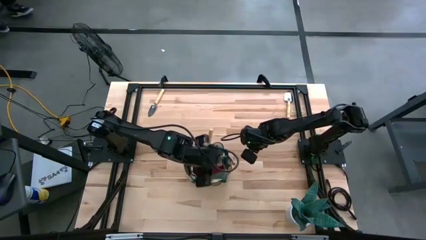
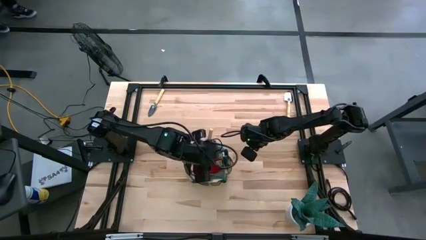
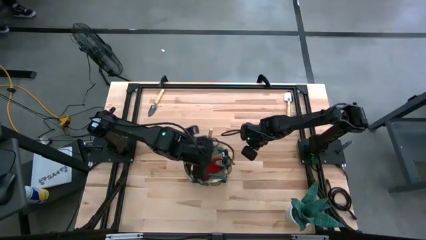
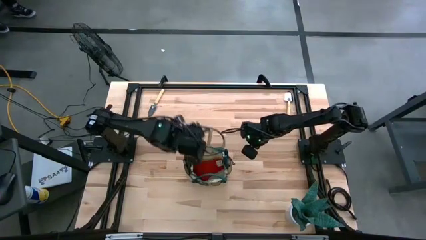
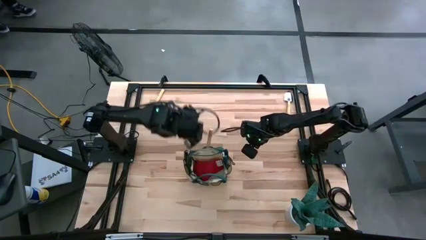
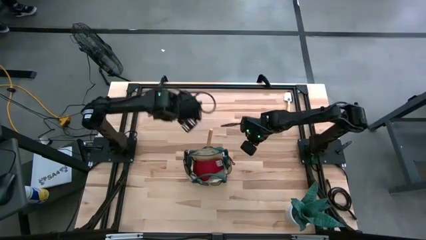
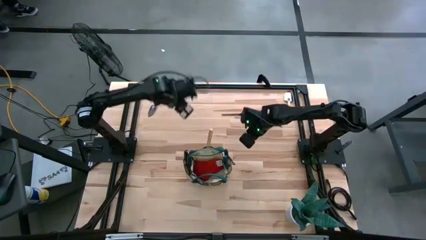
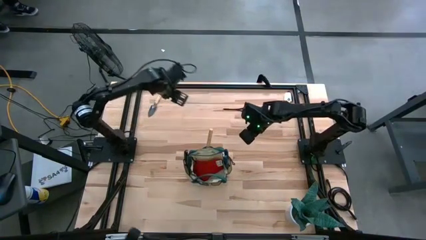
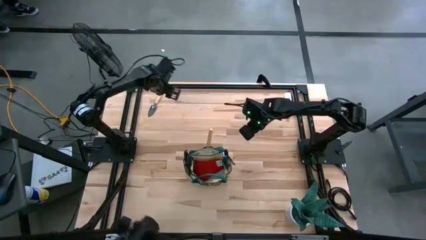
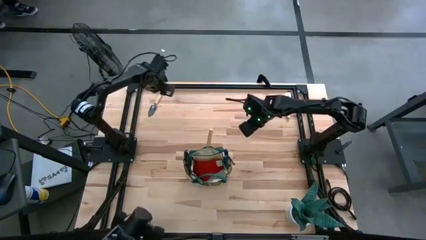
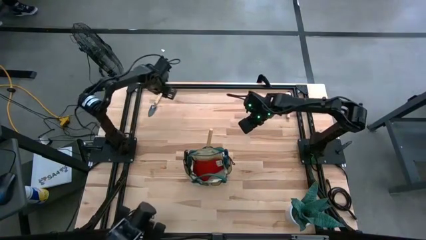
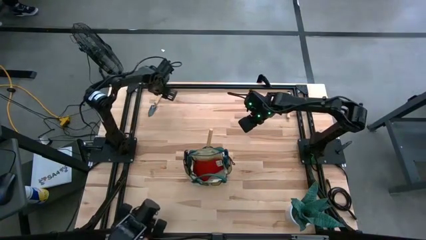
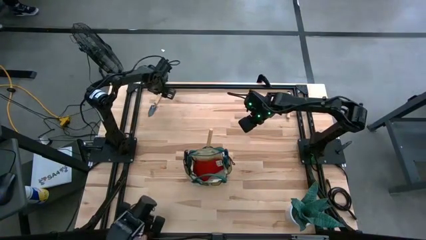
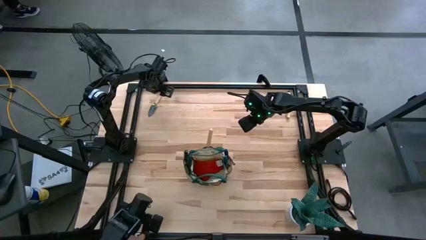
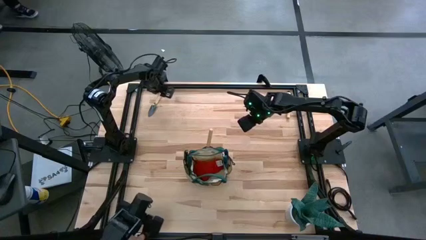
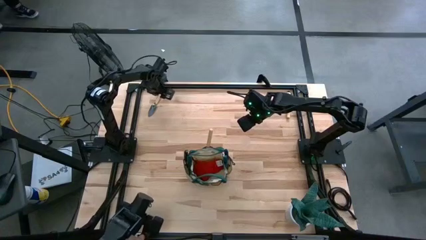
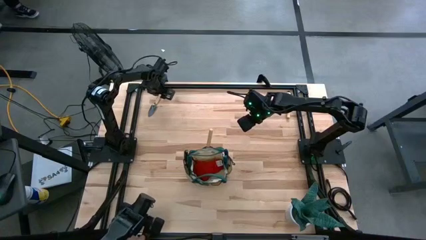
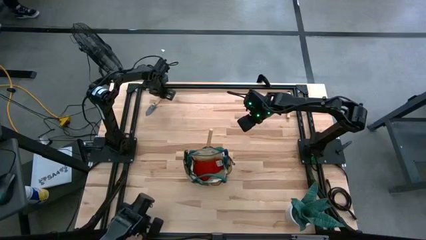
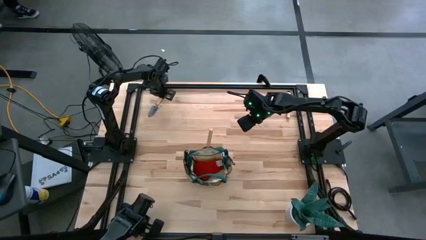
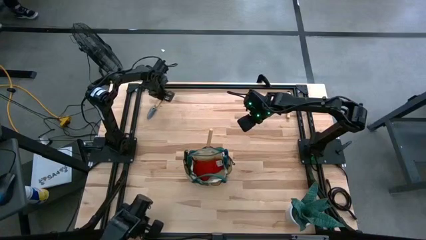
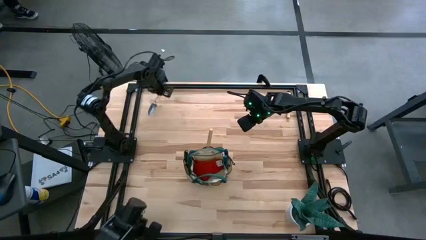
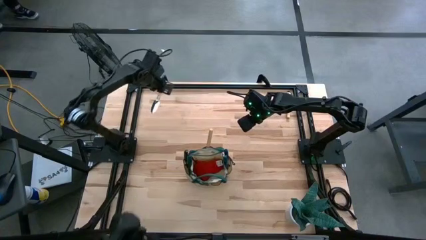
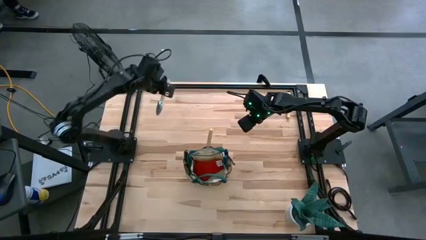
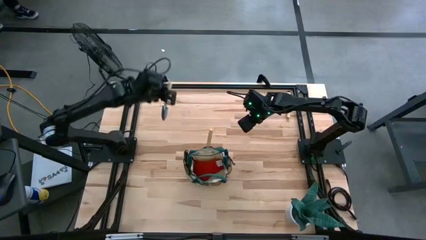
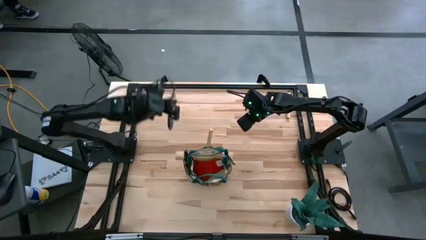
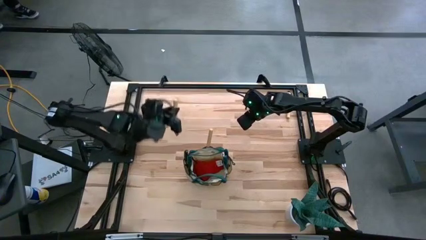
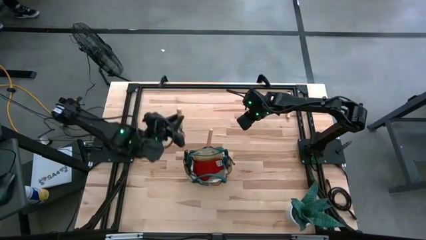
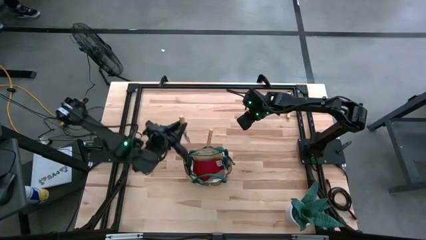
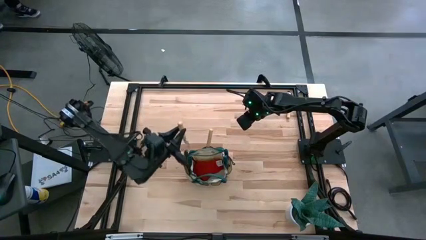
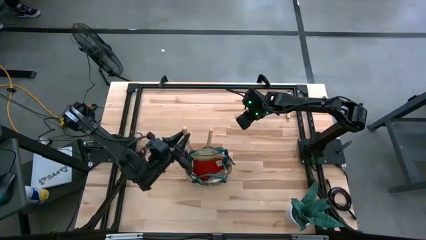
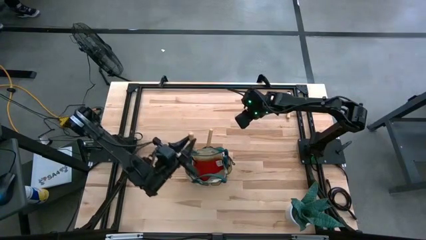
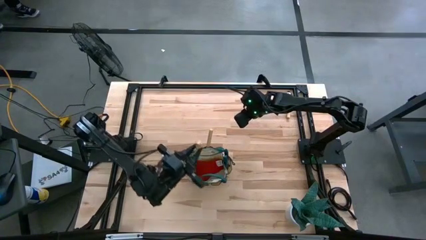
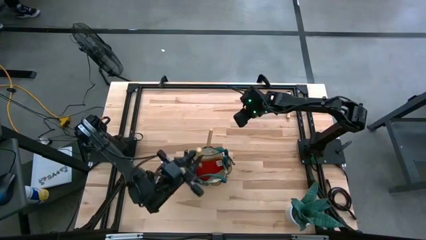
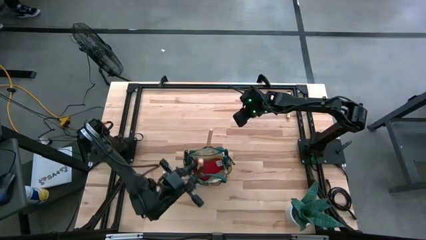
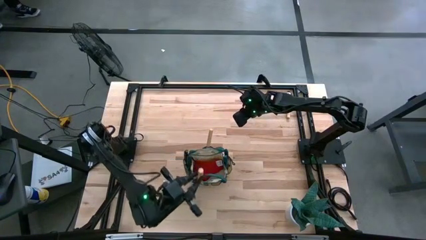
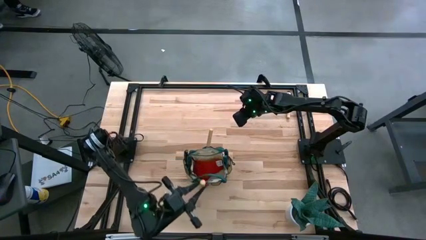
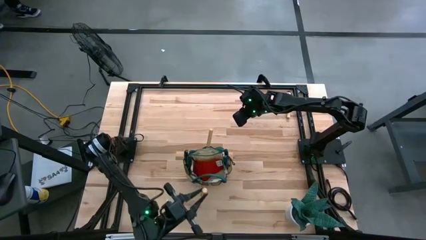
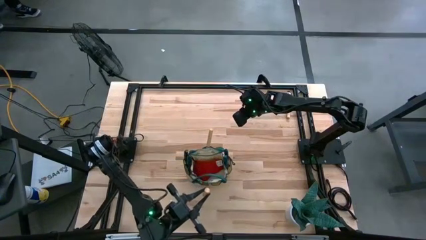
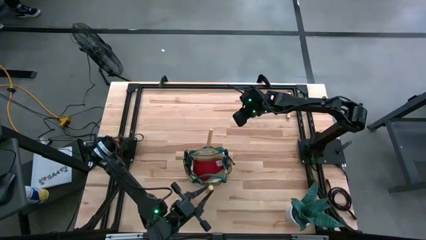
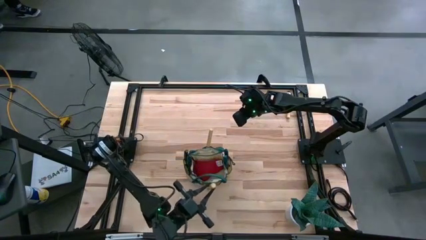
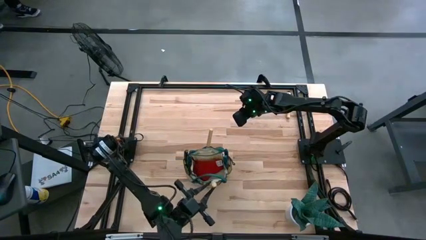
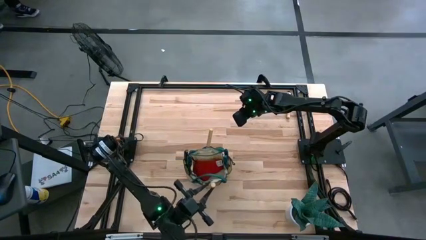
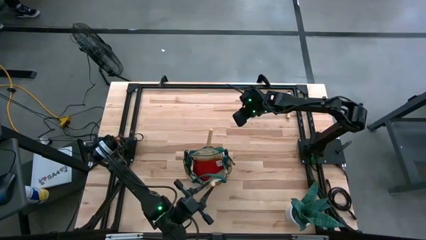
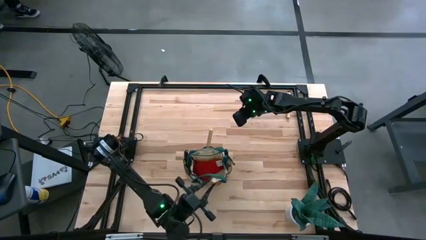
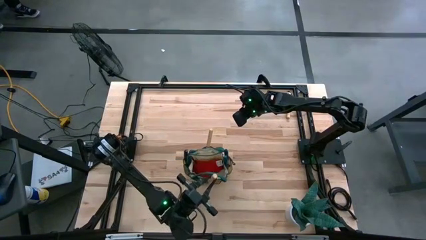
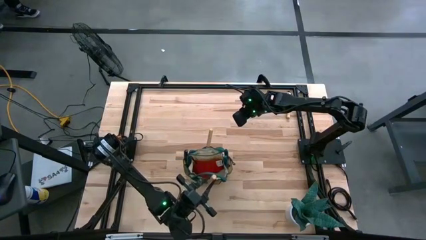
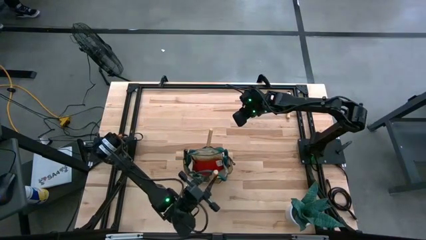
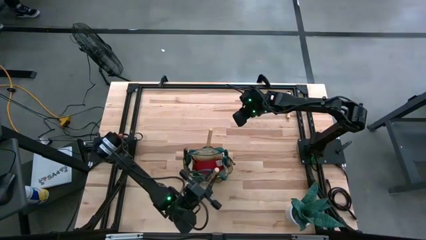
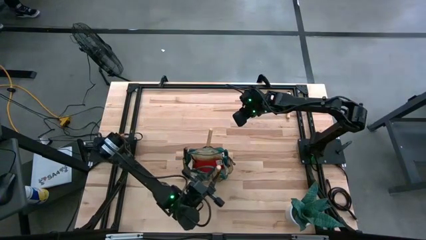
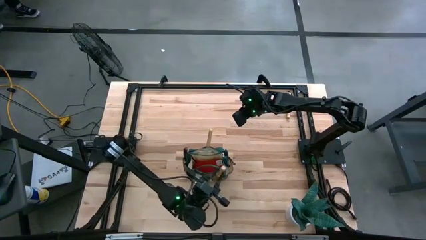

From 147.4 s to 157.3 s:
Task: Pick & Place Garden tools in Gardening bag
Put the left light brown trowel into the white gardening bag

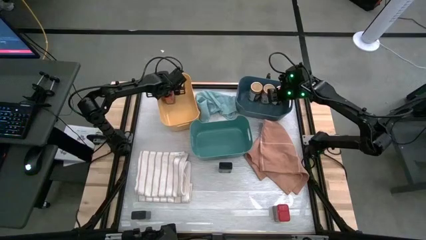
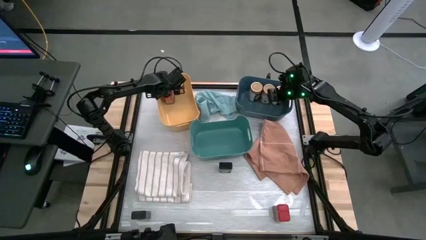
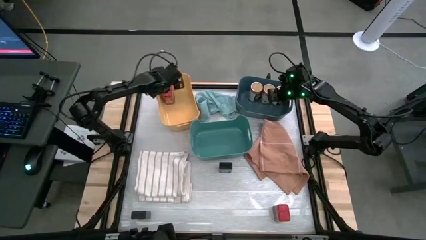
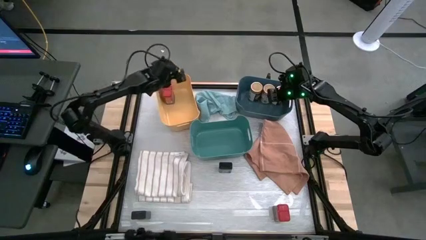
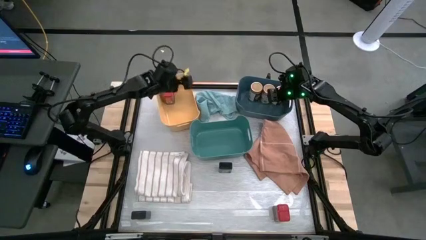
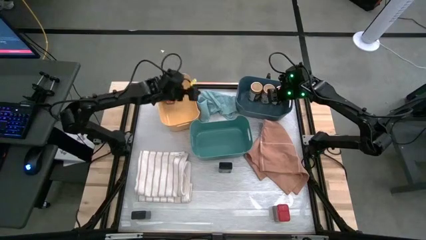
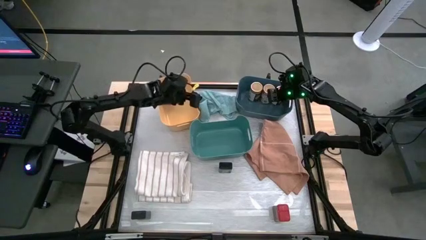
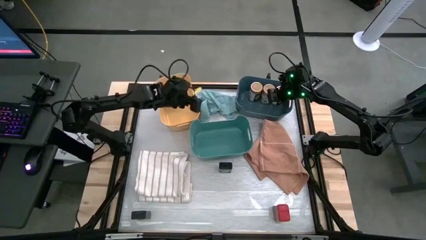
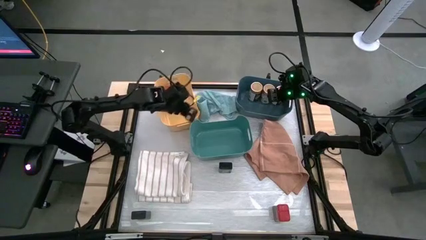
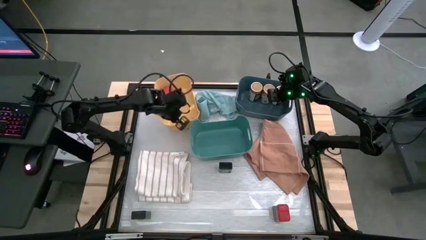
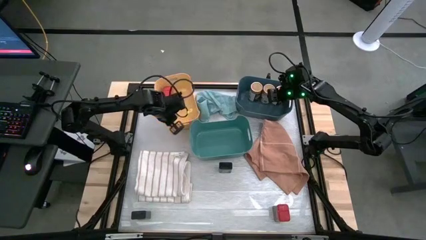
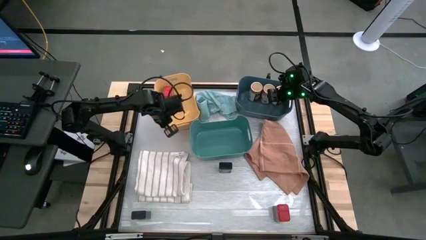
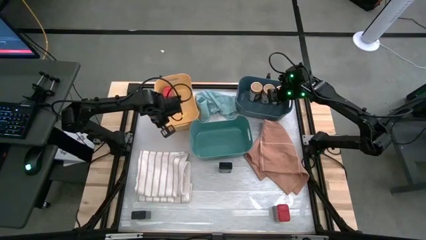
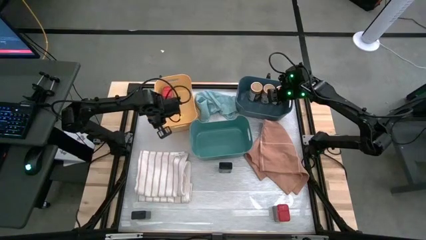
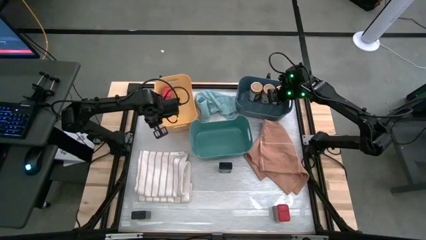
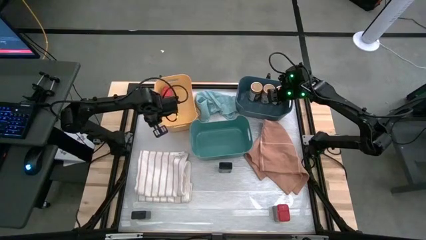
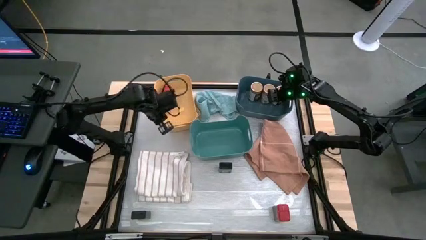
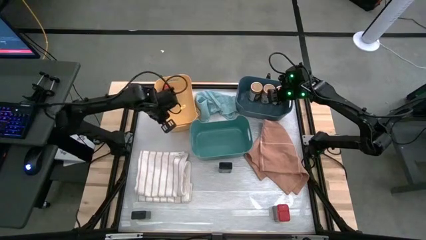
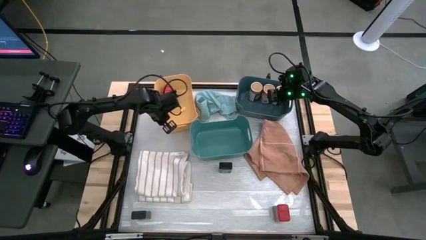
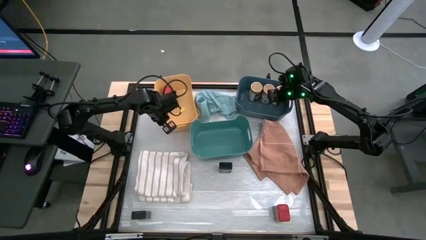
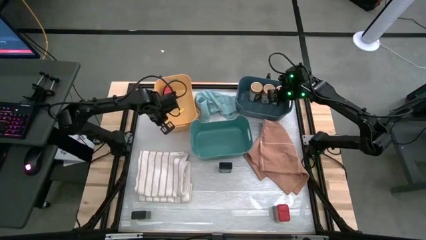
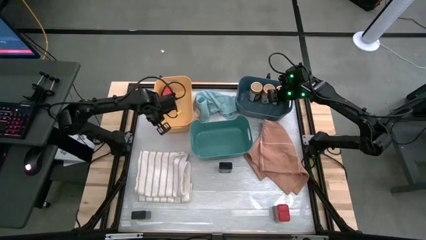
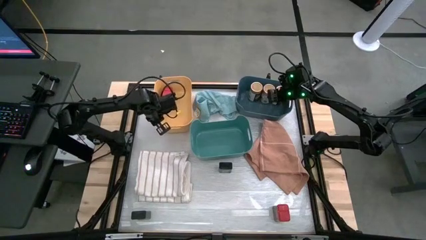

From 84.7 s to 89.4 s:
Task: Sort spices by type
Adjust the yellow bin on the table
